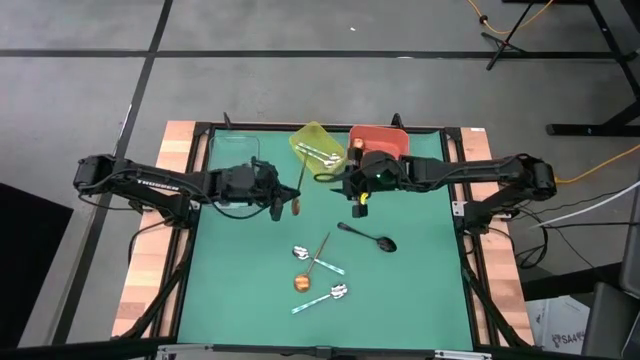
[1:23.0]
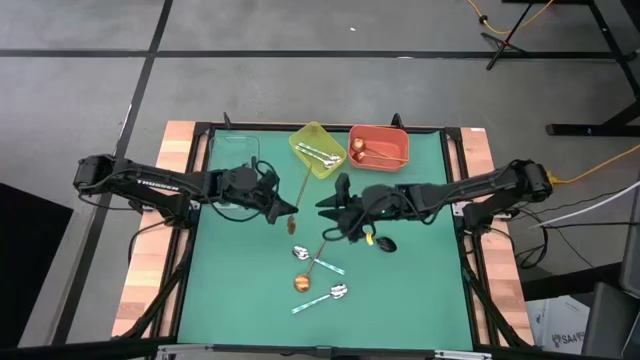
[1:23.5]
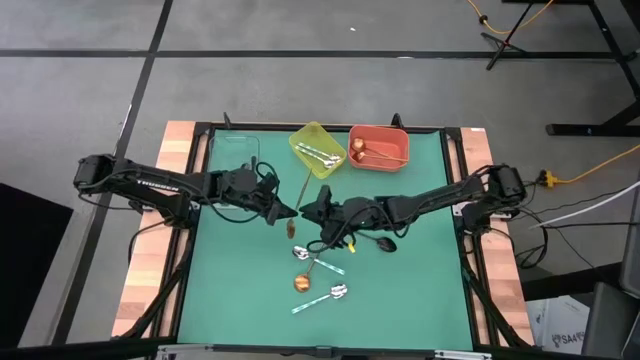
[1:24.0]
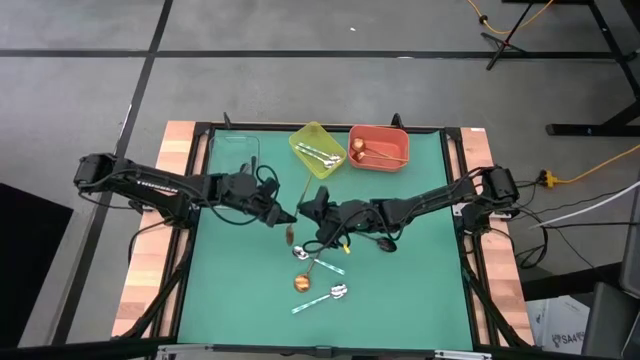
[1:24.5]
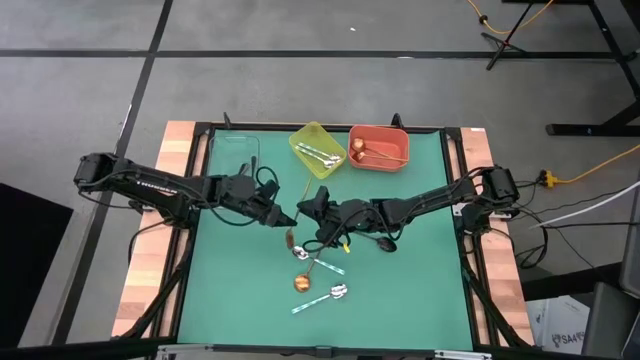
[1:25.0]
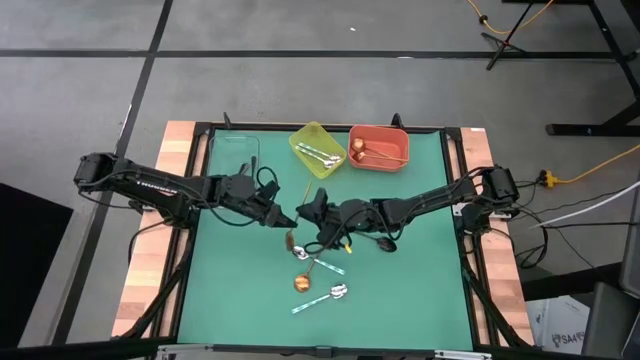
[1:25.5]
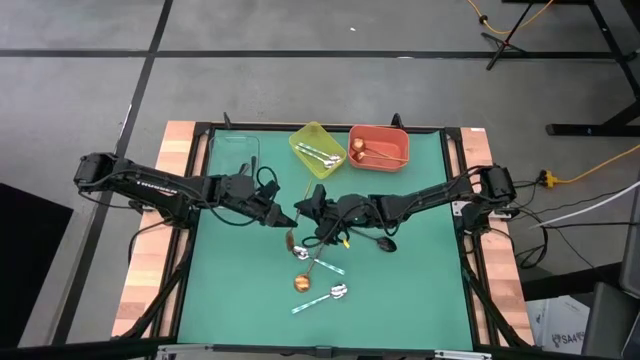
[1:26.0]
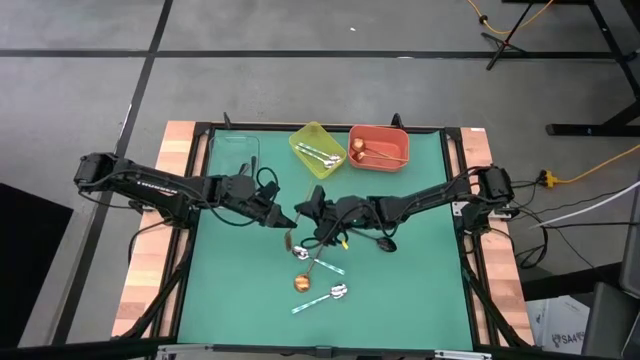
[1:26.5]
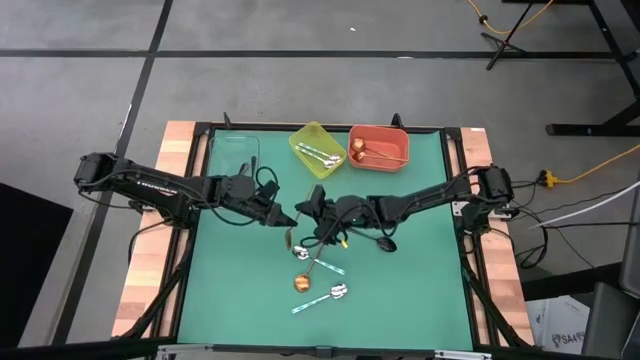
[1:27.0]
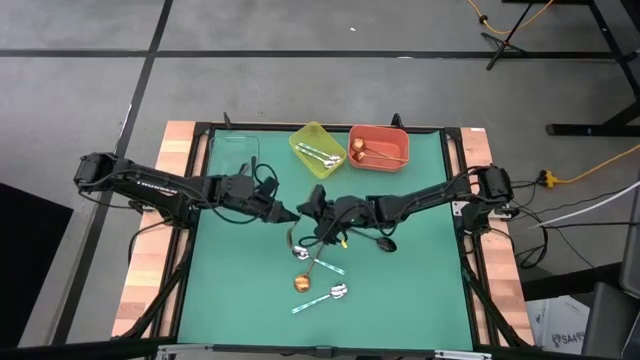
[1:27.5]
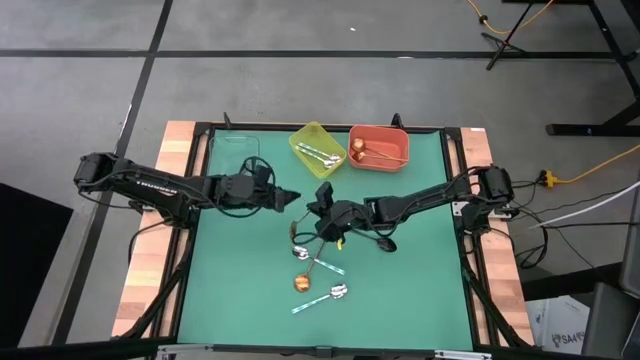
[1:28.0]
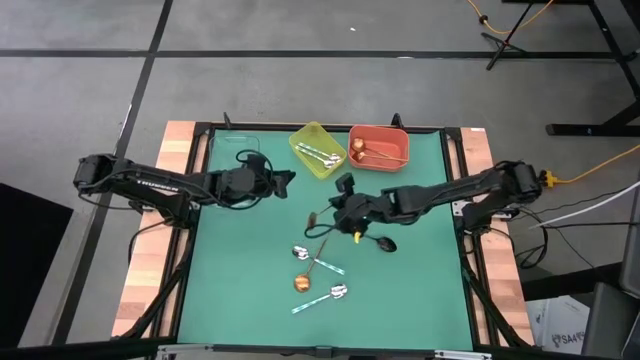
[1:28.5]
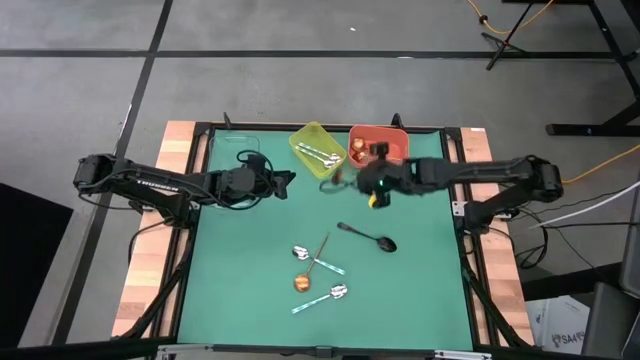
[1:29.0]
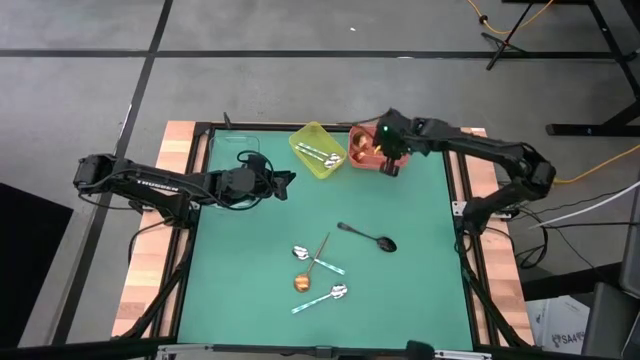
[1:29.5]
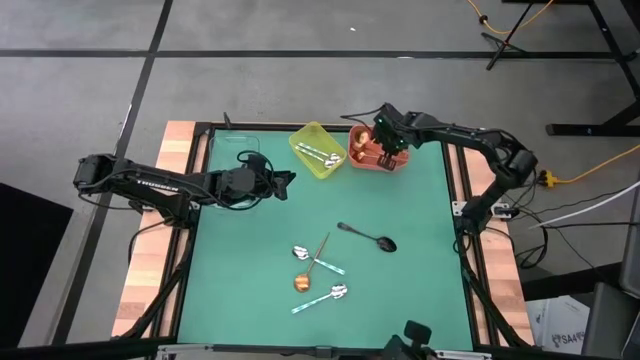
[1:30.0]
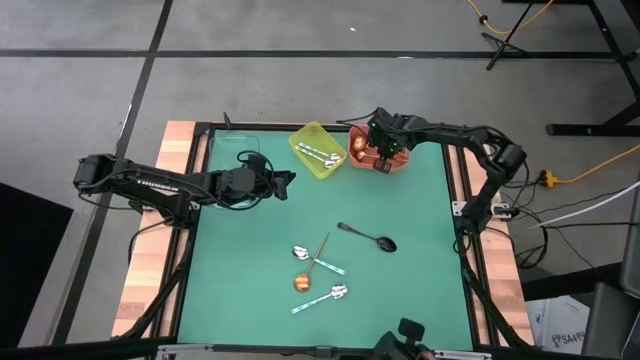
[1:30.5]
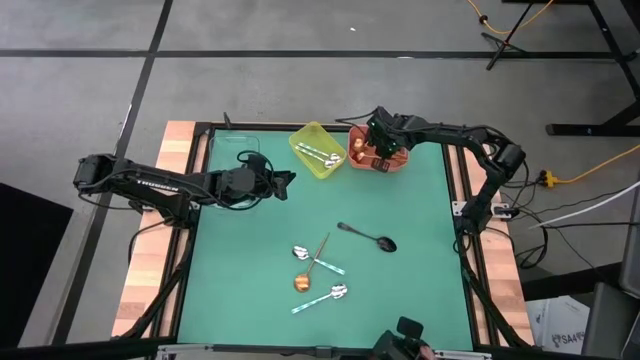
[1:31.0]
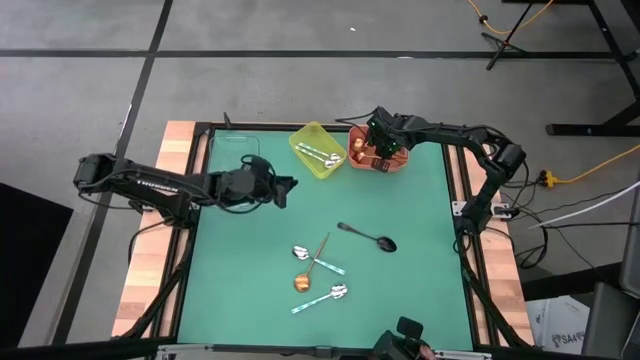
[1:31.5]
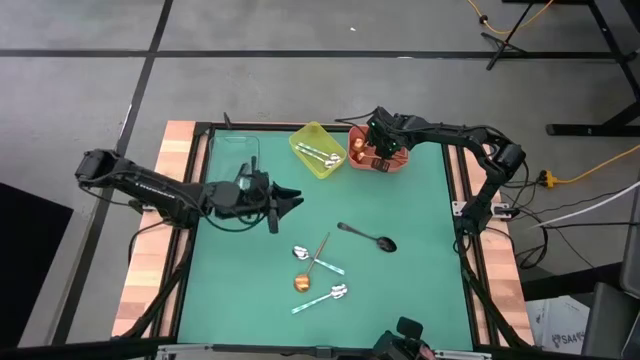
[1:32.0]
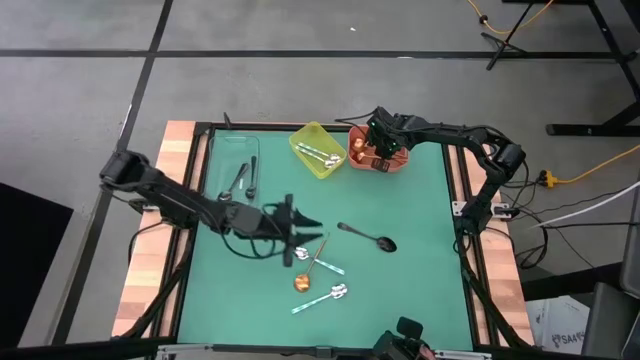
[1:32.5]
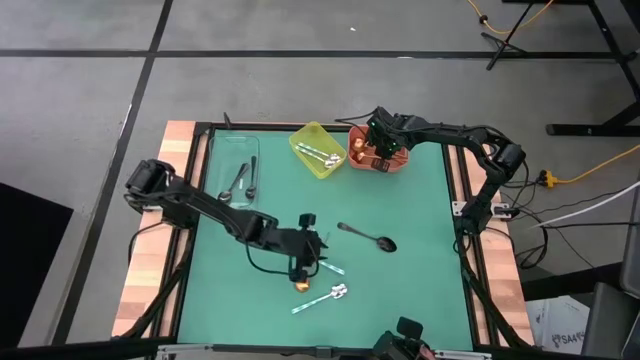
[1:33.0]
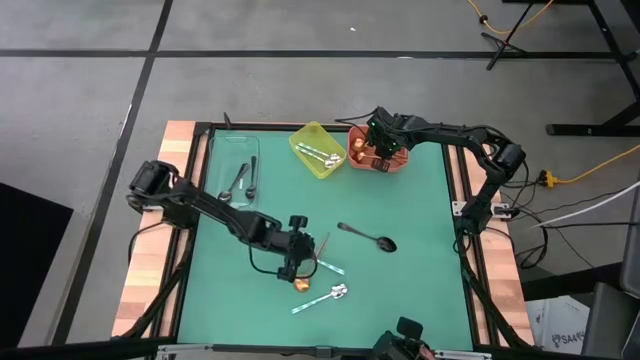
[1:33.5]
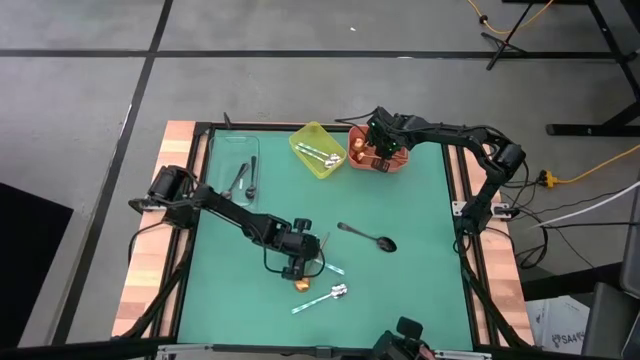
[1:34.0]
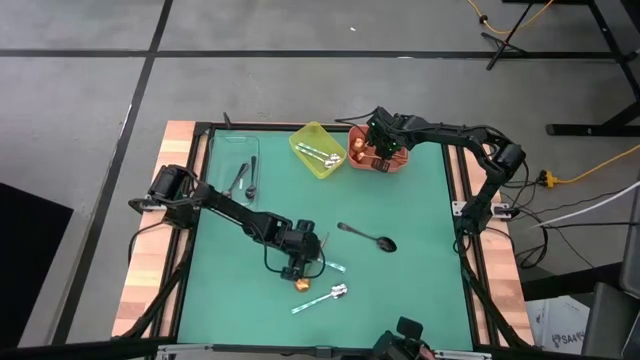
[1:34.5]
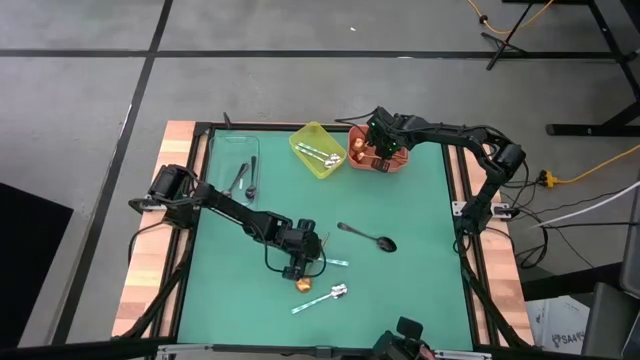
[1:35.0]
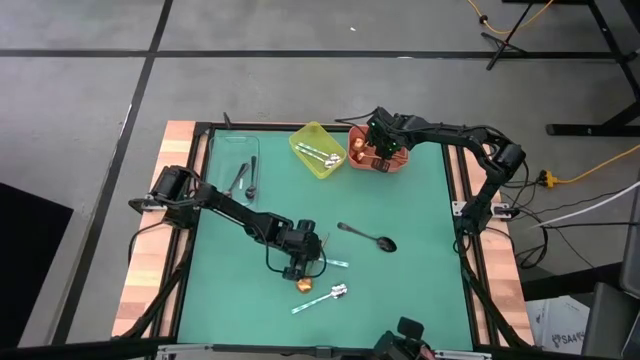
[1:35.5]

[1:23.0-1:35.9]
Task: Sort silverware by color (type)
Put the gold spoon into the orange bin

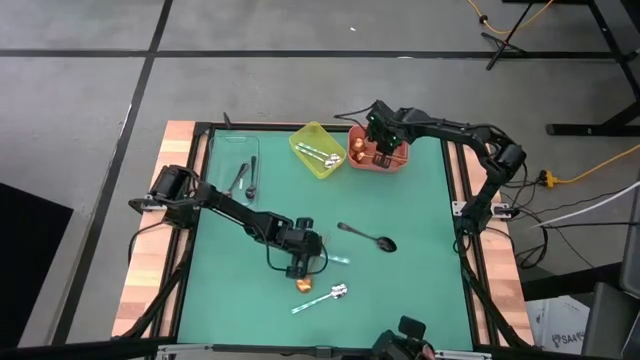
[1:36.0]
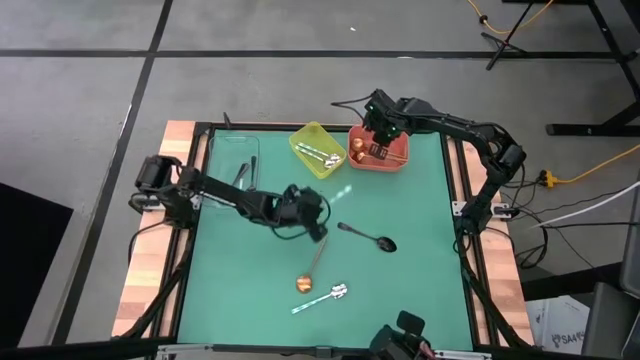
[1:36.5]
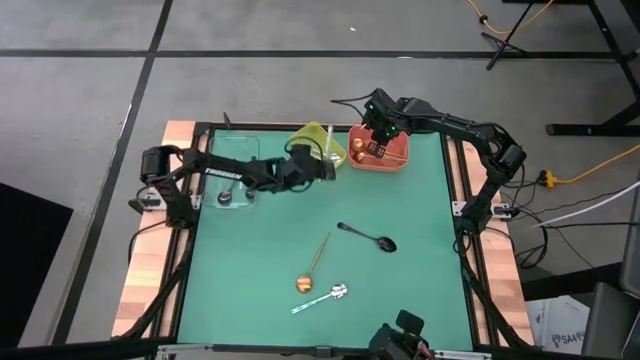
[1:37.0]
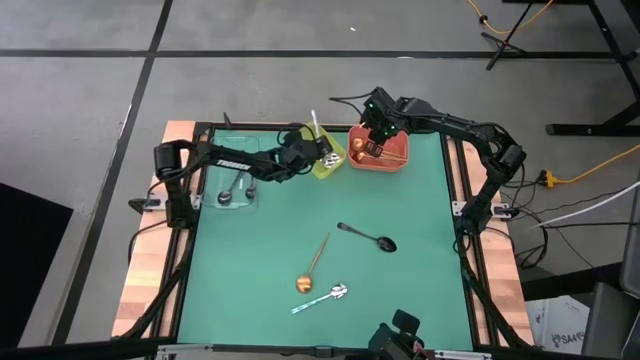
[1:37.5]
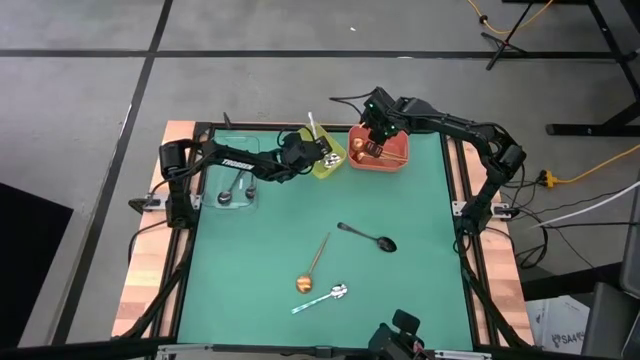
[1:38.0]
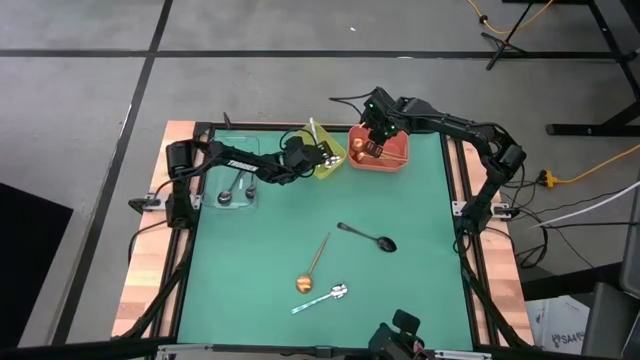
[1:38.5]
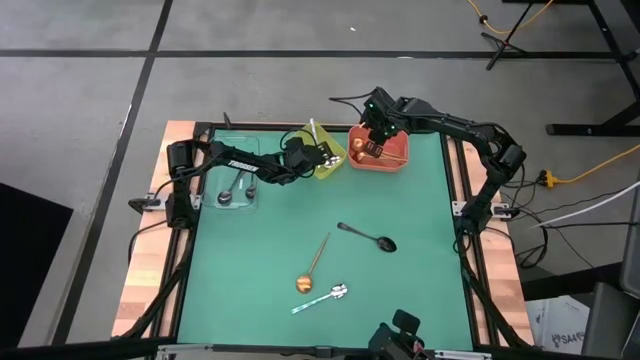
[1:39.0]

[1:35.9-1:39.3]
Put the blue spoon into the green bin

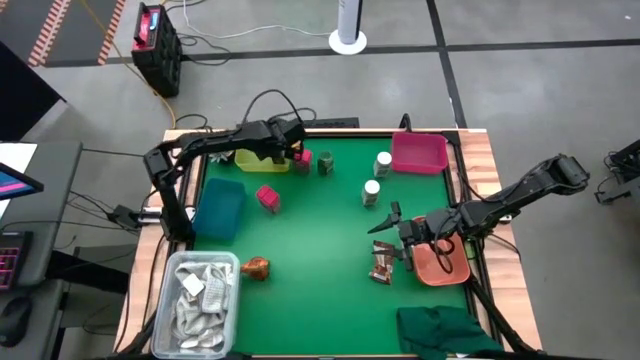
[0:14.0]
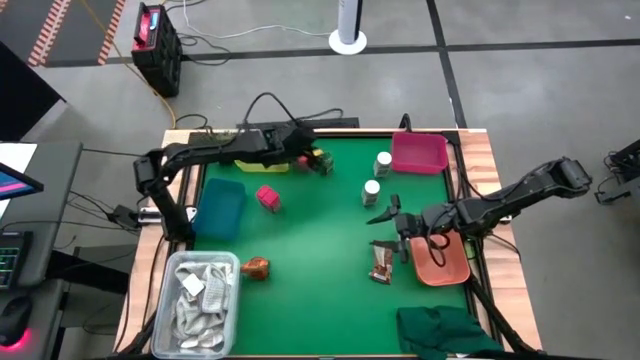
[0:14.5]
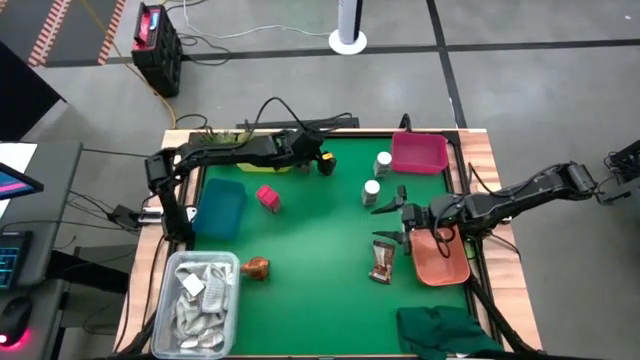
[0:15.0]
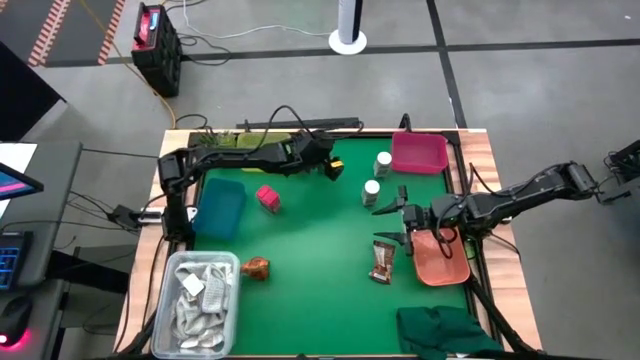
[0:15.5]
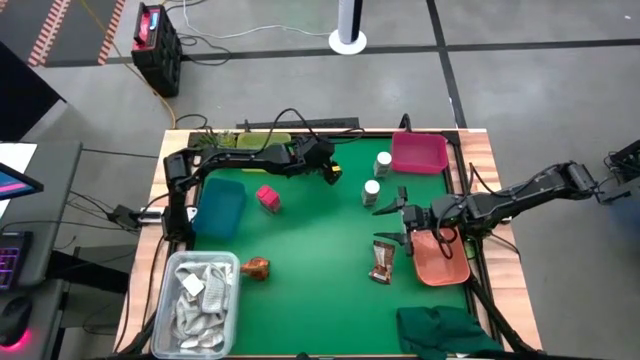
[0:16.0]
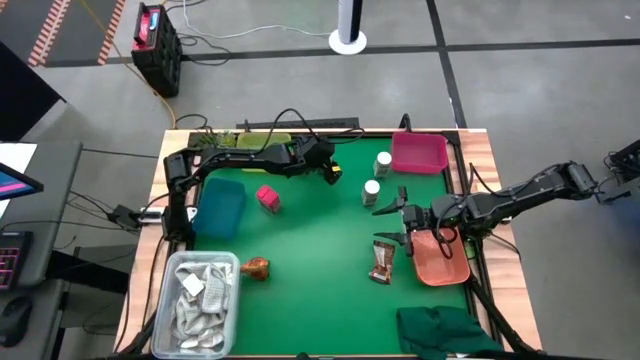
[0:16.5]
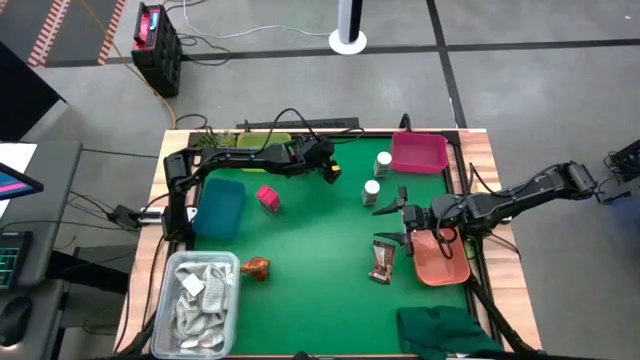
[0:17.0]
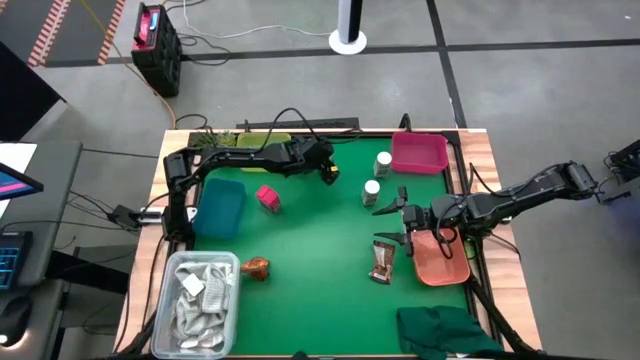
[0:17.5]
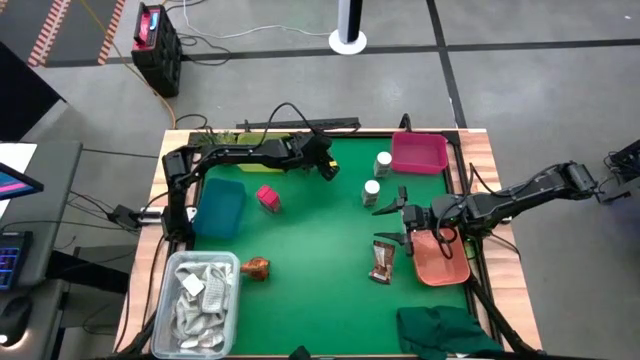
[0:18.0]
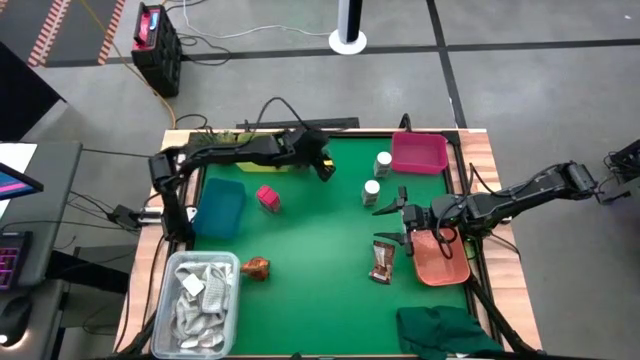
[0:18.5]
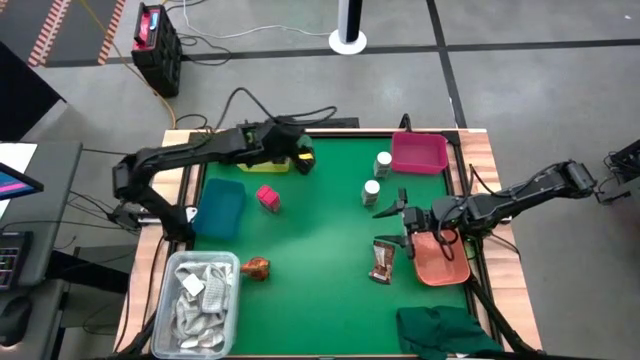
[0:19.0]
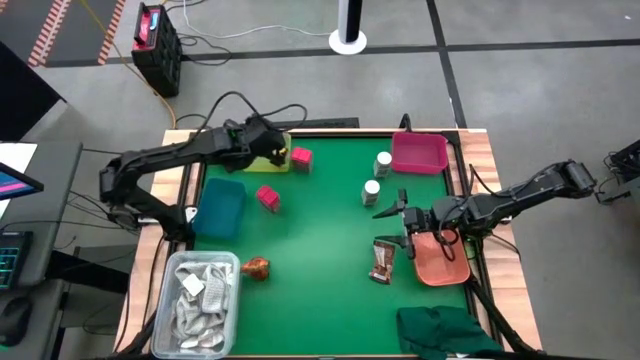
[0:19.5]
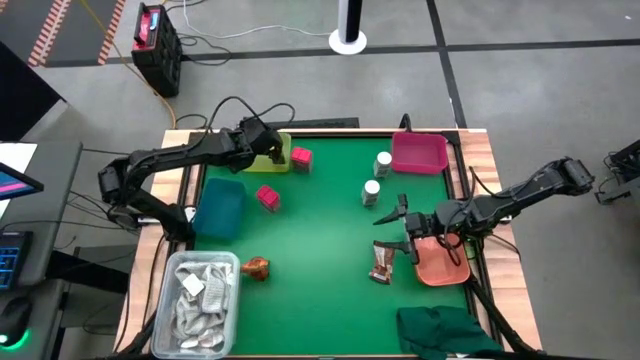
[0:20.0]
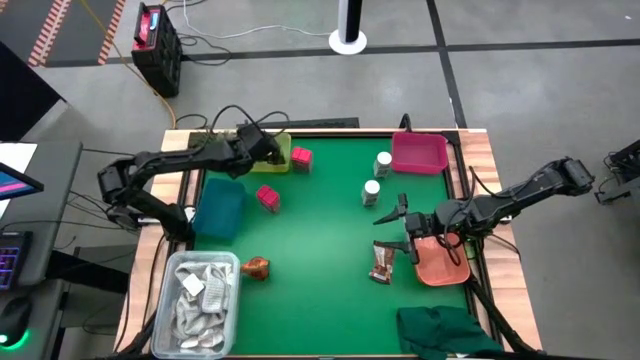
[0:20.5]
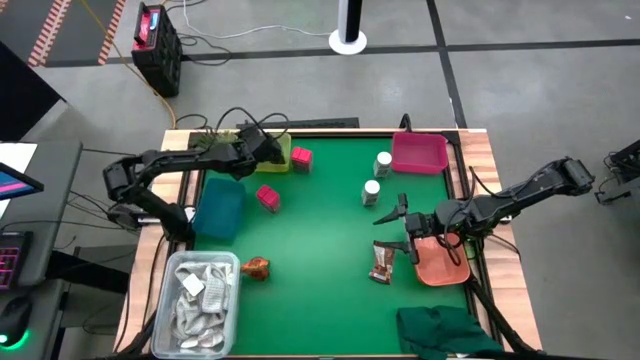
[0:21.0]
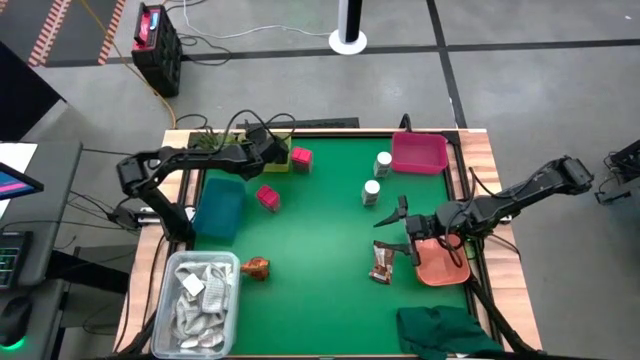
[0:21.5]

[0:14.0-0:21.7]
Task: Sort spices by type
Put the green seasoning bottle into the yellow bin
